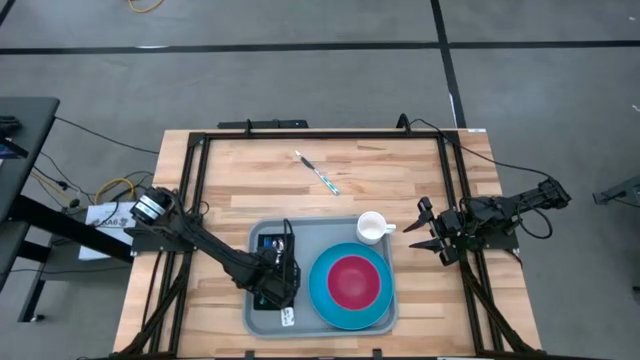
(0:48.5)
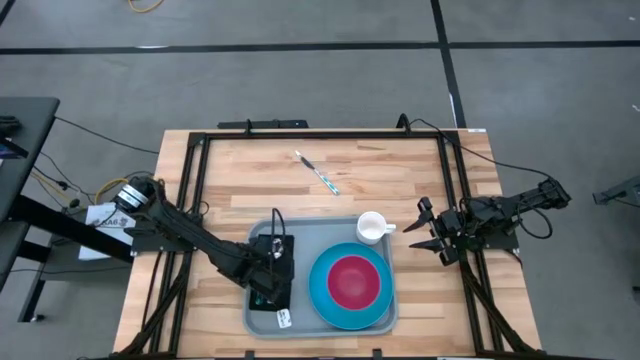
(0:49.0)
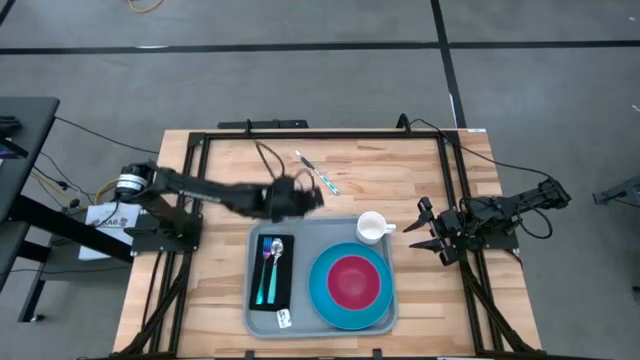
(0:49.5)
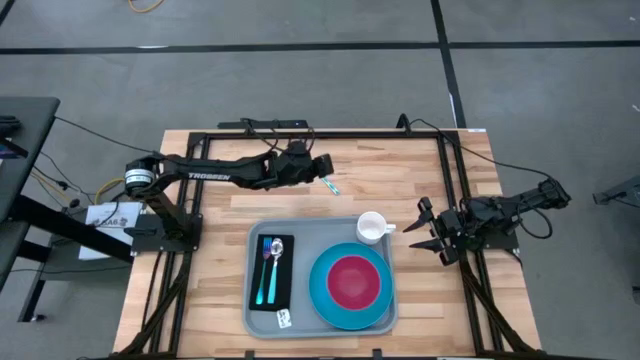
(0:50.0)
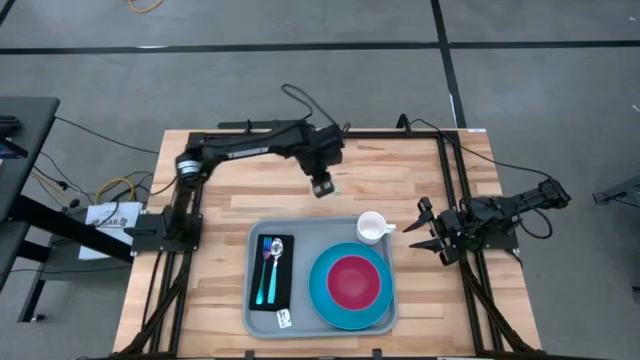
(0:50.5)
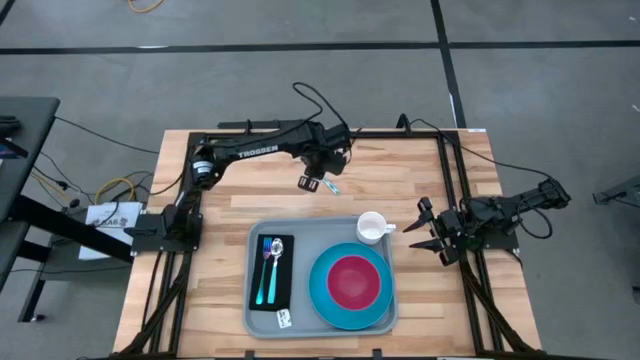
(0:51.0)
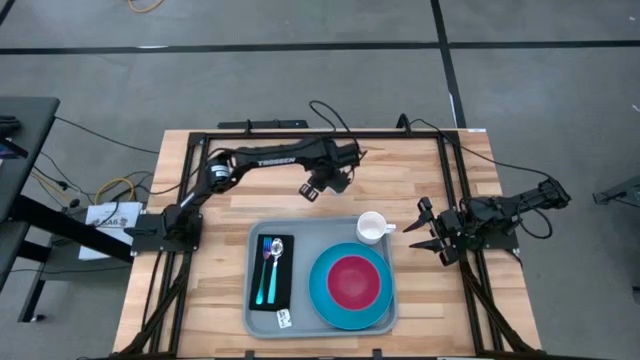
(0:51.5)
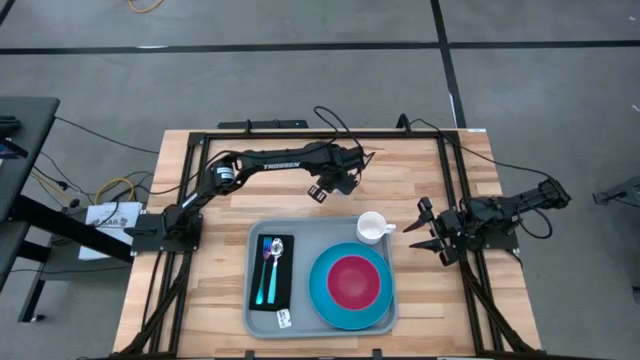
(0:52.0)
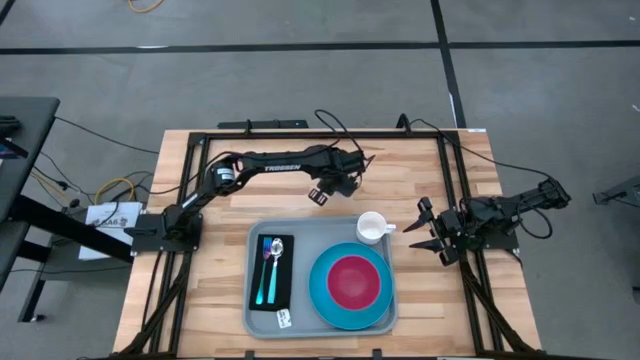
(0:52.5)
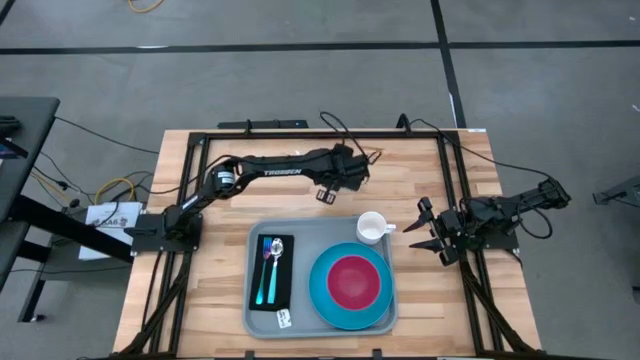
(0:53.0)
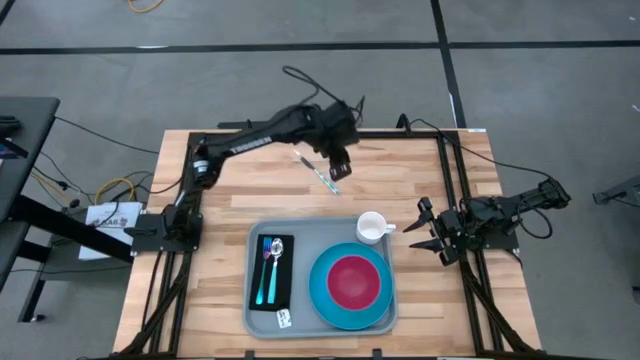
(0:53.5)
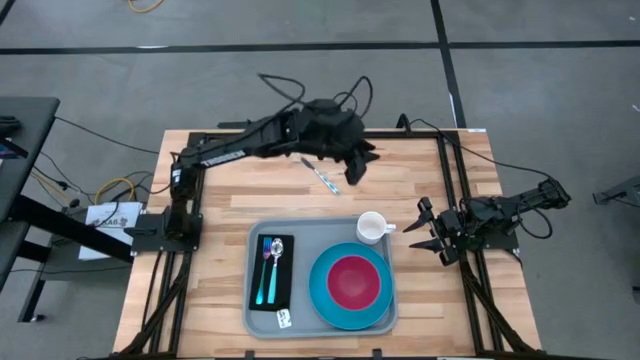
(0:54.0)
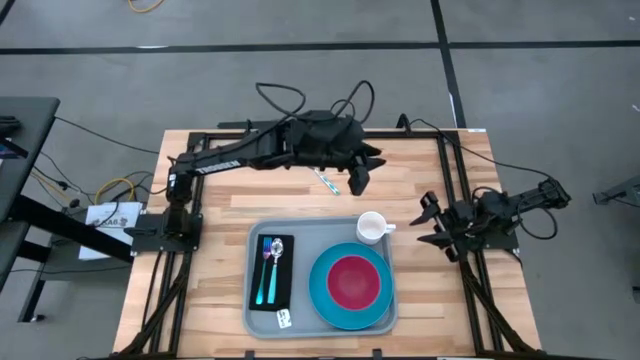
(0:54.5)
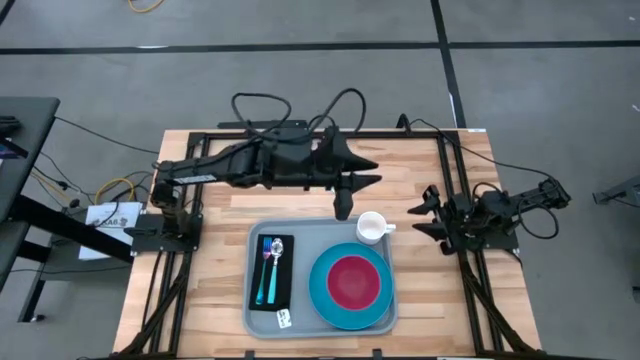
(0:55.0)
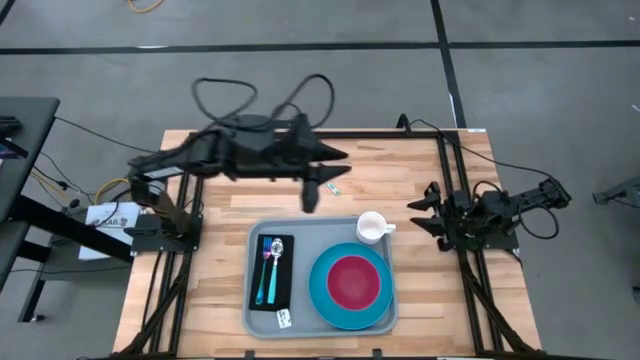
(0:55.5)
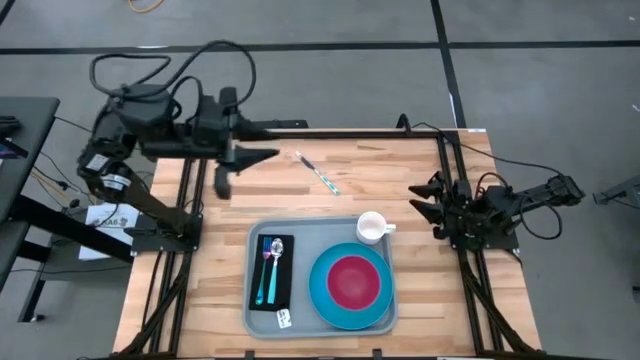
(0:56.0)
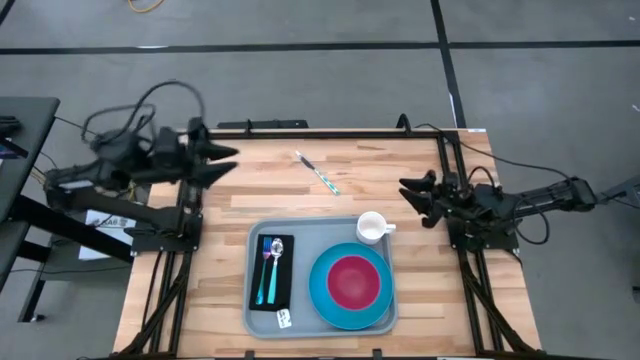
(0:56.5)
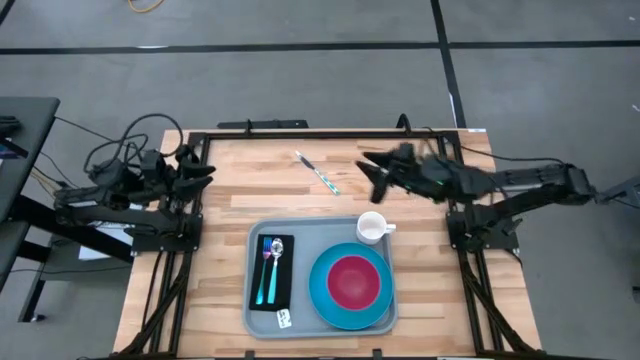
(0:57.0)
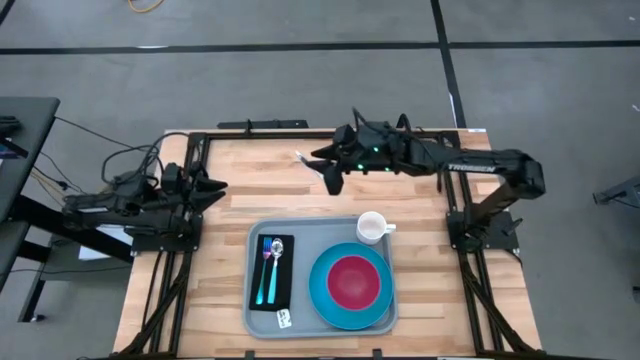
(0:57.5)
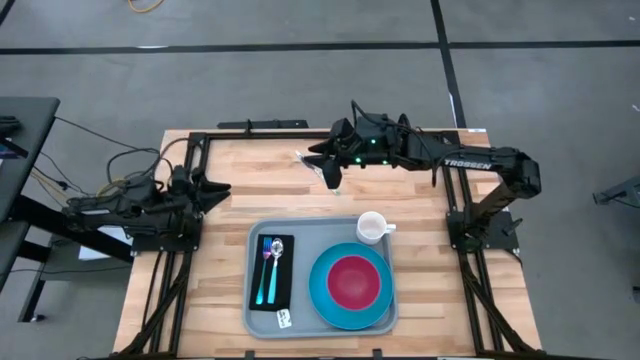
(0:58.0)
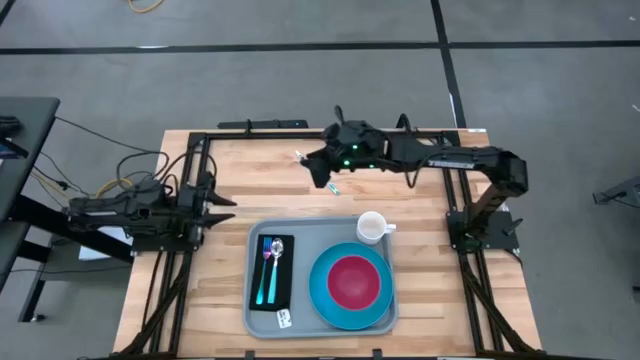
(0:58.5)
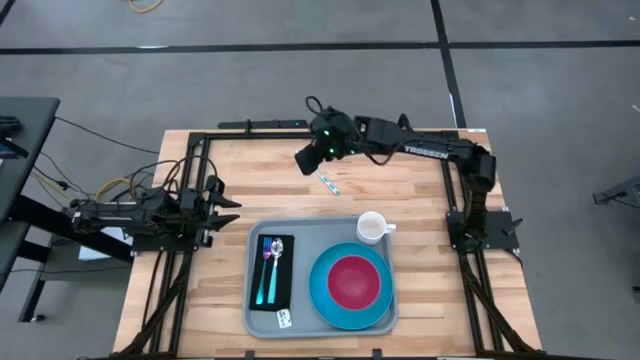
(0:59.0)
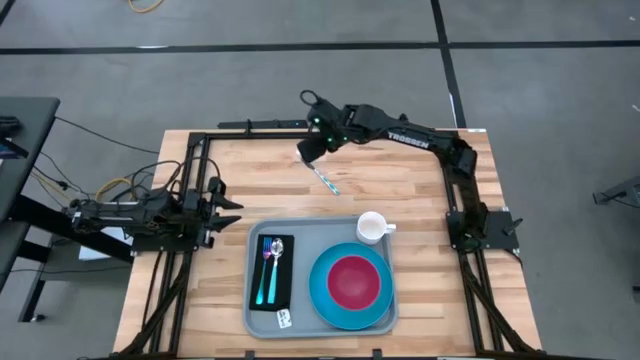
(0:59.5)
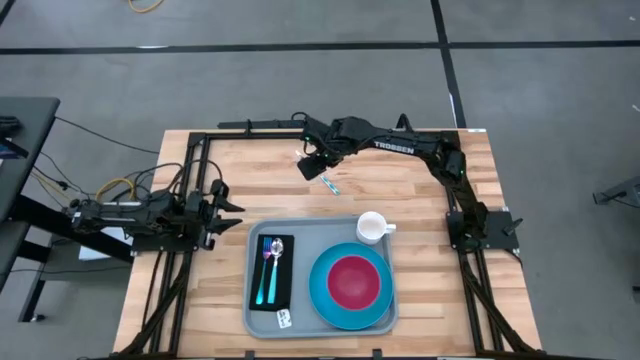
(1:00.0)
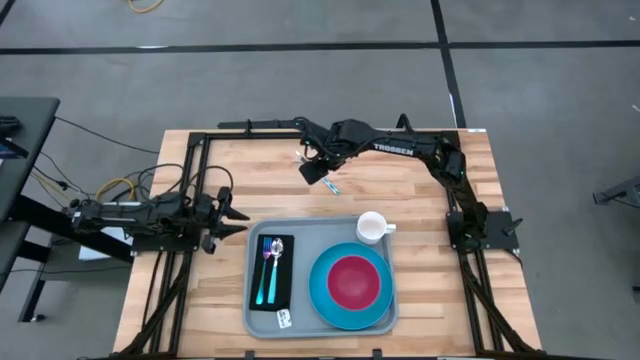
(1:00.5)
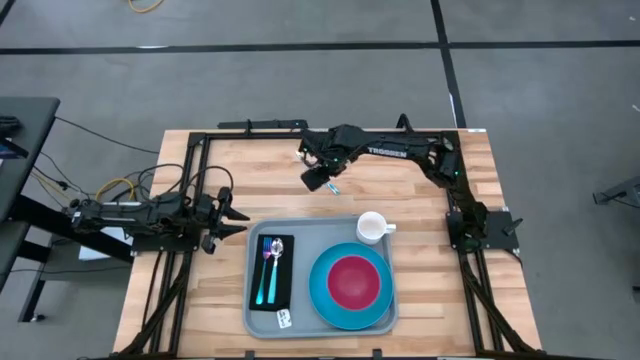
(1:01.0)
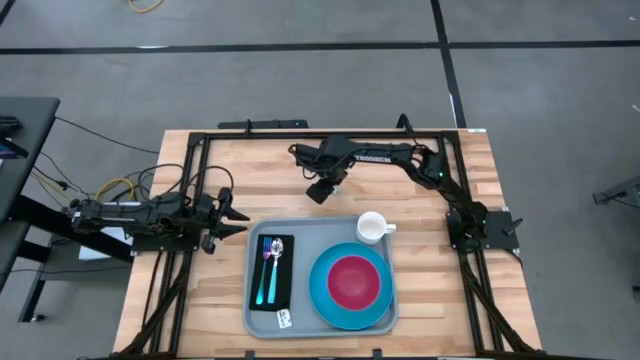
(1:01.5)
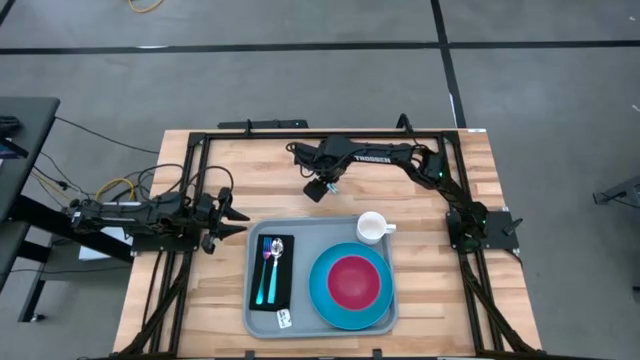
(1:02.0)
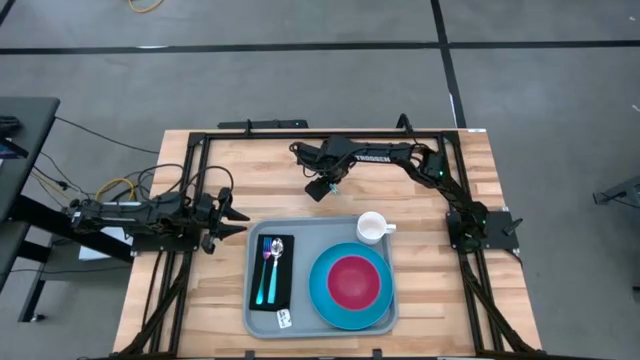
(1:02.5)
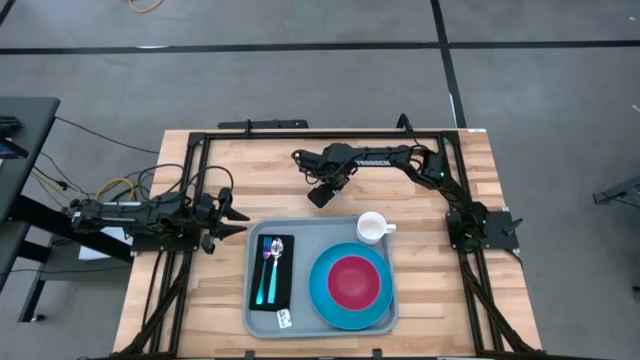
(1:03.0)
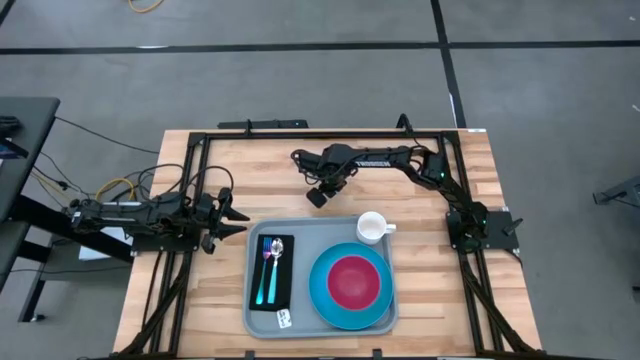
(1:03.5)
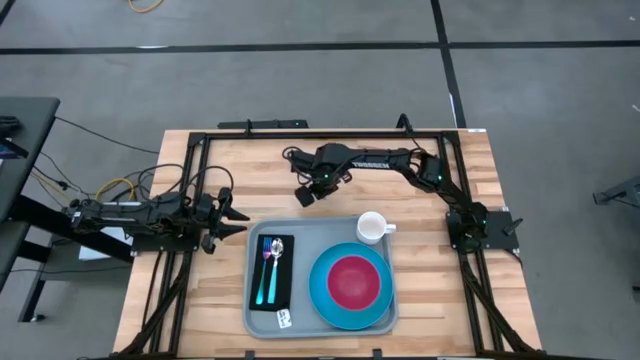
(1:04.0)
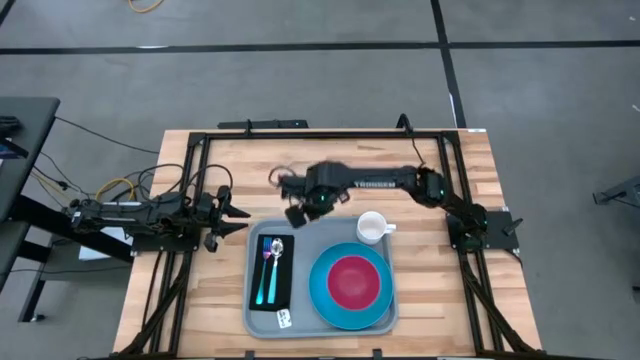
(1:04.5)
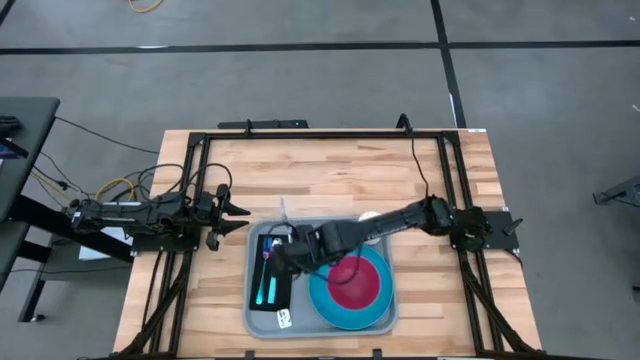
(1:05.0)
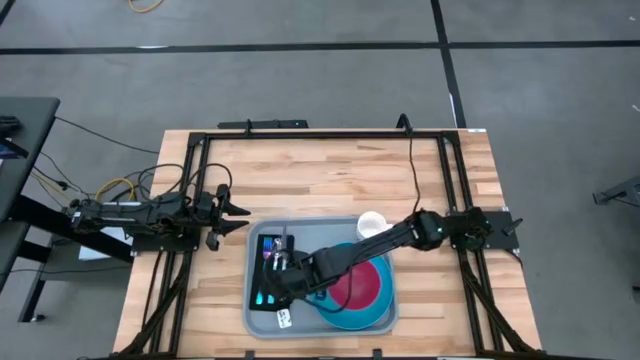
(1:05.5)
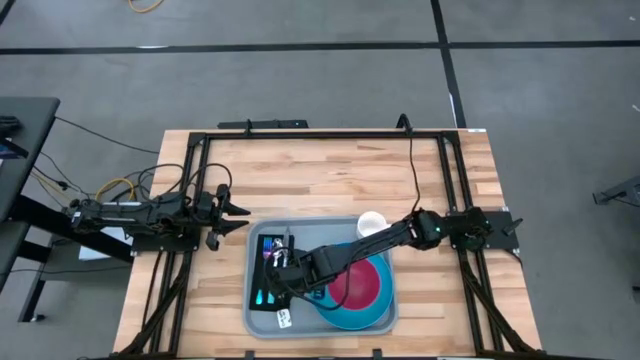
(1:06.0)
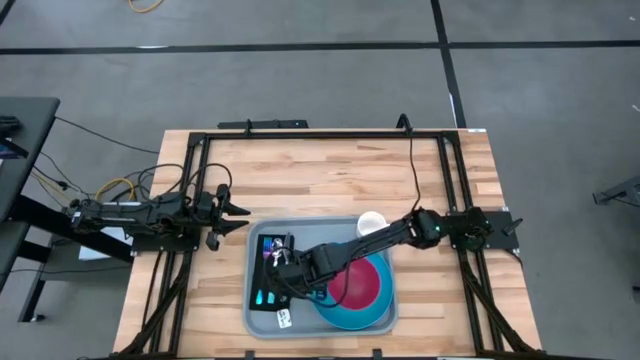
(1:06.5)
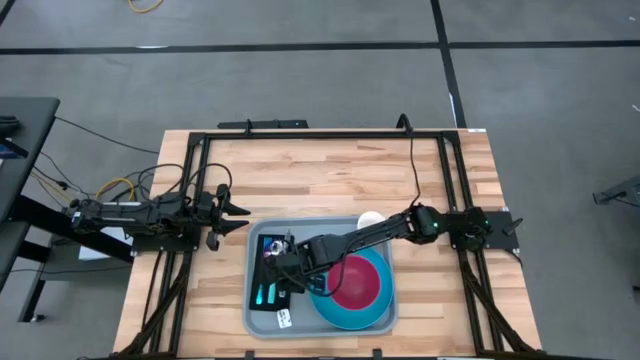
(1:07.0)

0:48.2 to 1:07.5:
Task: Set up tray
Put the blue table knife on the black table napkin to the right of the blue spoon
